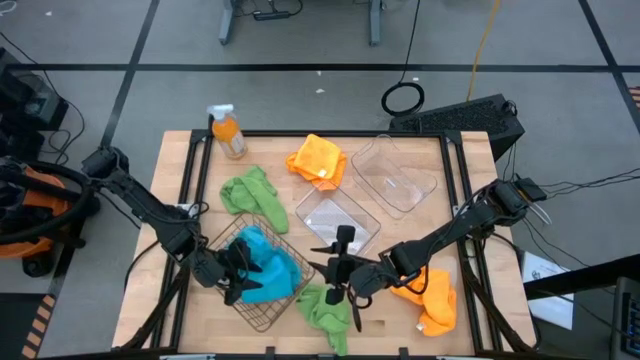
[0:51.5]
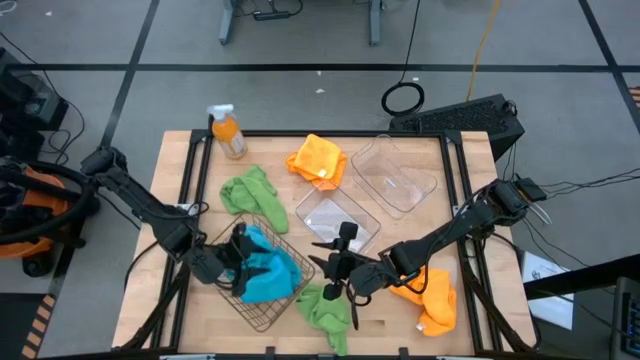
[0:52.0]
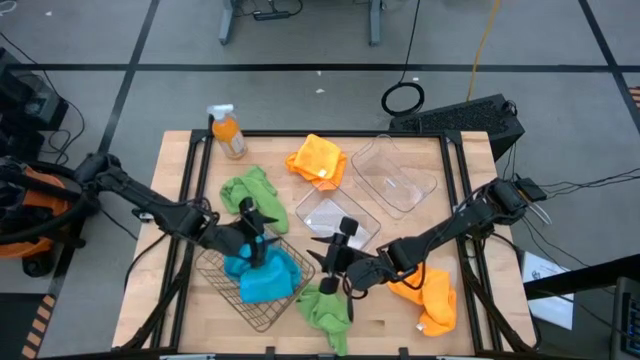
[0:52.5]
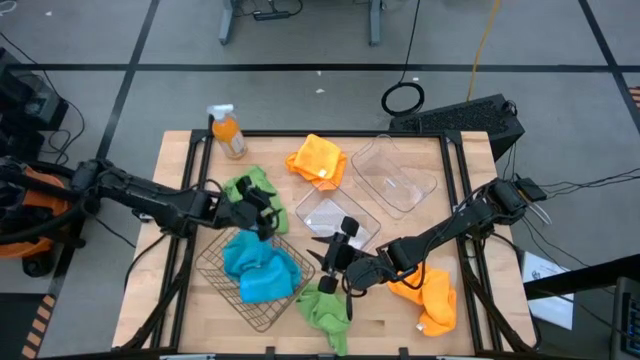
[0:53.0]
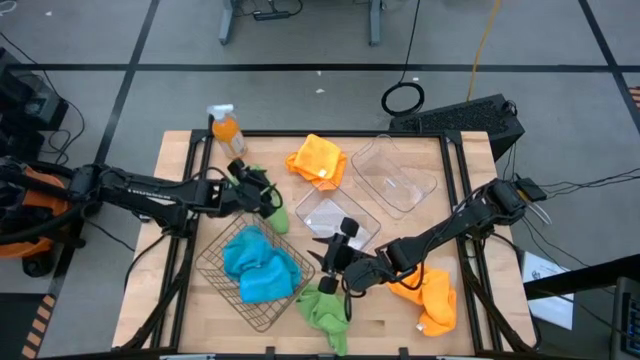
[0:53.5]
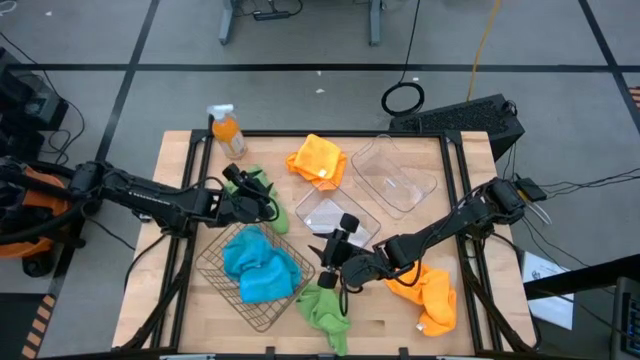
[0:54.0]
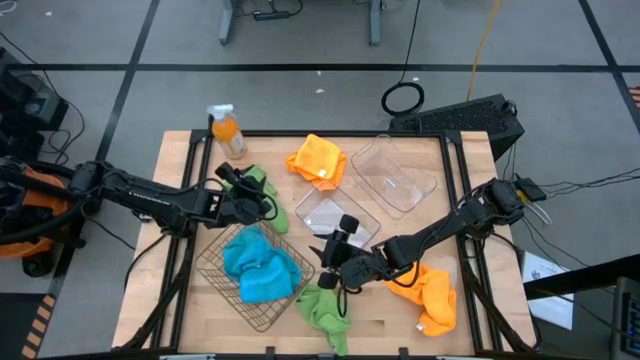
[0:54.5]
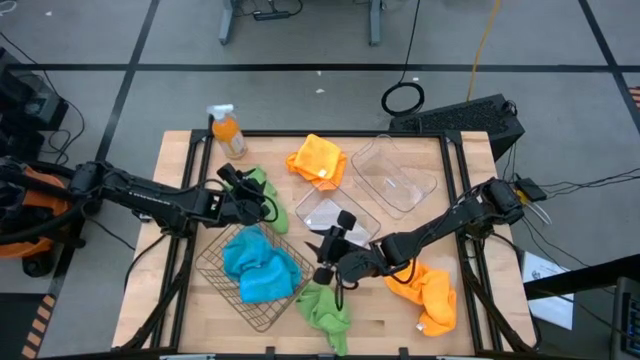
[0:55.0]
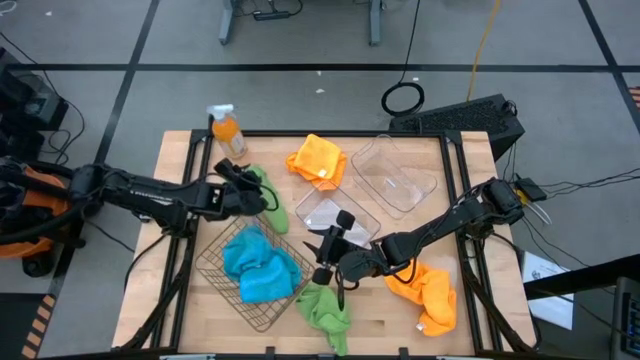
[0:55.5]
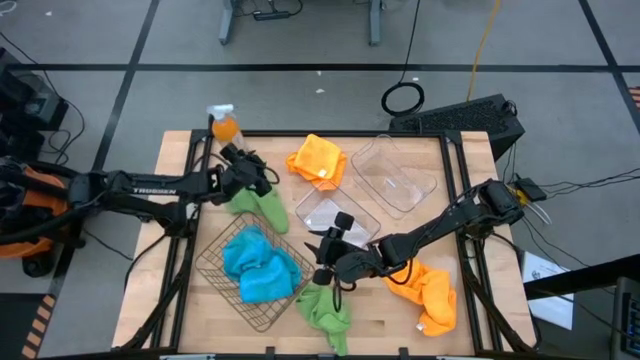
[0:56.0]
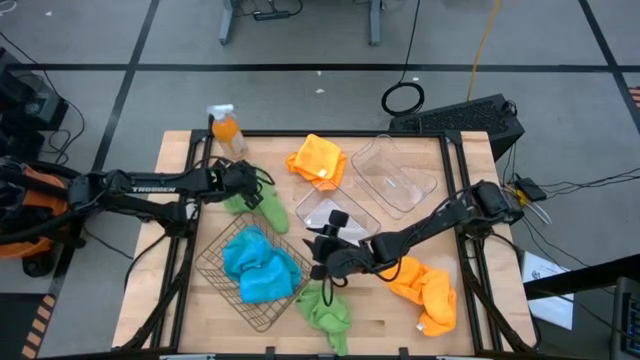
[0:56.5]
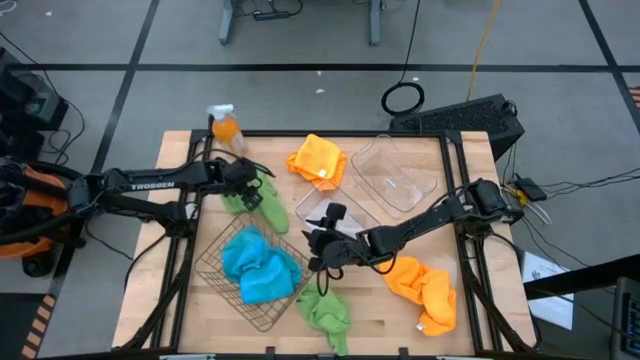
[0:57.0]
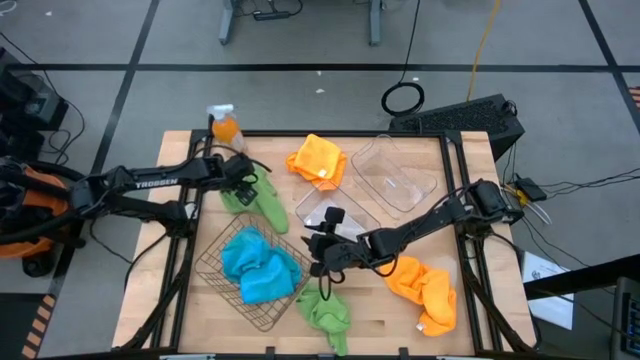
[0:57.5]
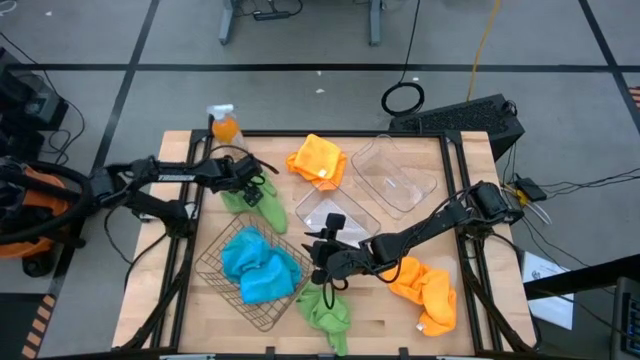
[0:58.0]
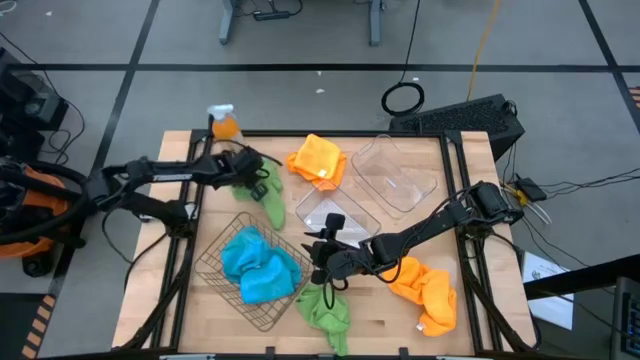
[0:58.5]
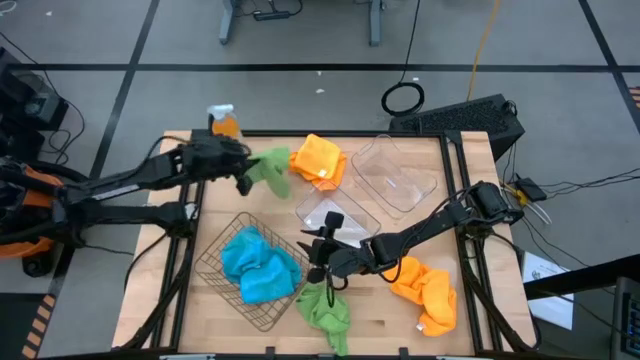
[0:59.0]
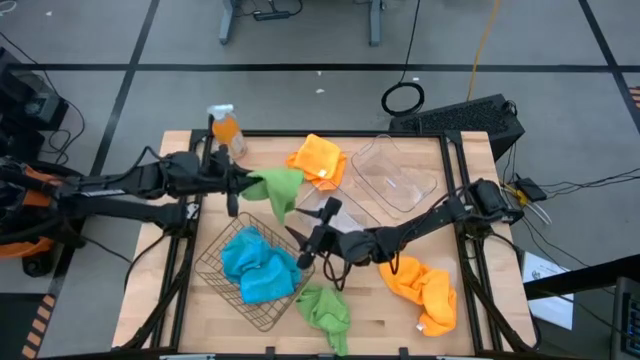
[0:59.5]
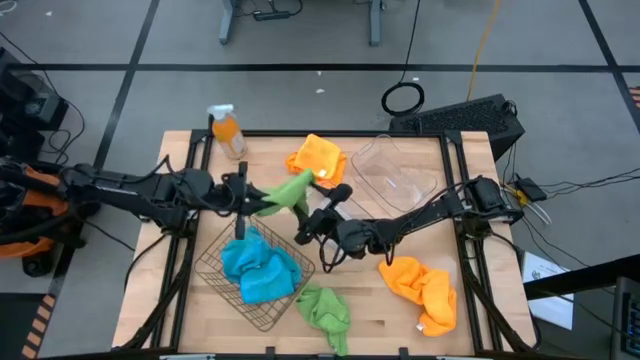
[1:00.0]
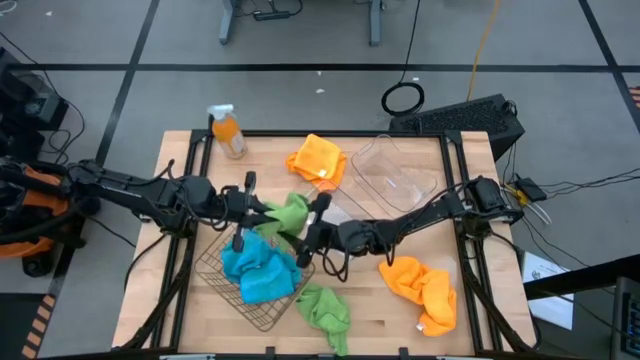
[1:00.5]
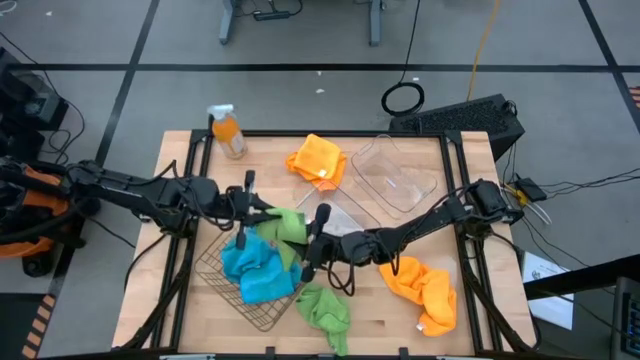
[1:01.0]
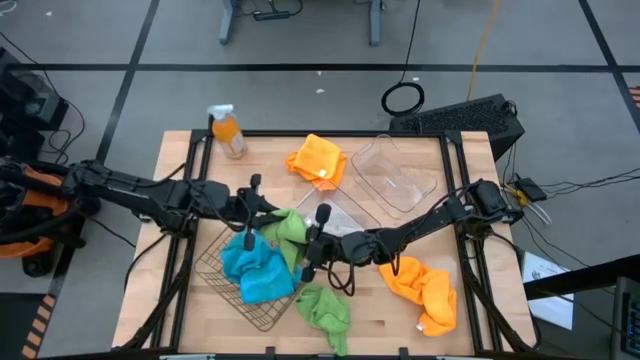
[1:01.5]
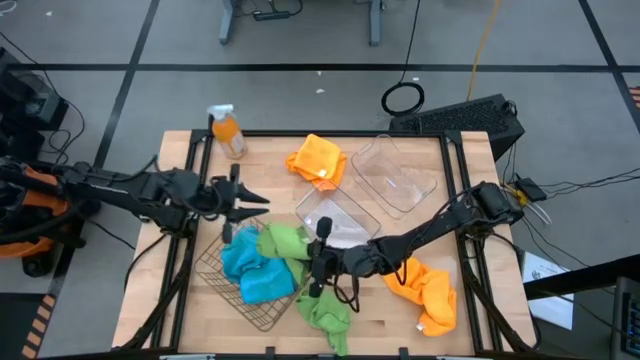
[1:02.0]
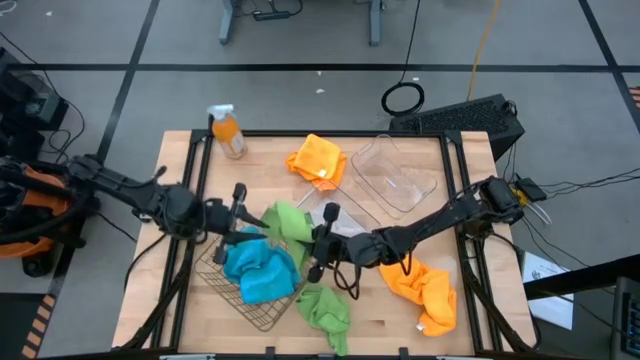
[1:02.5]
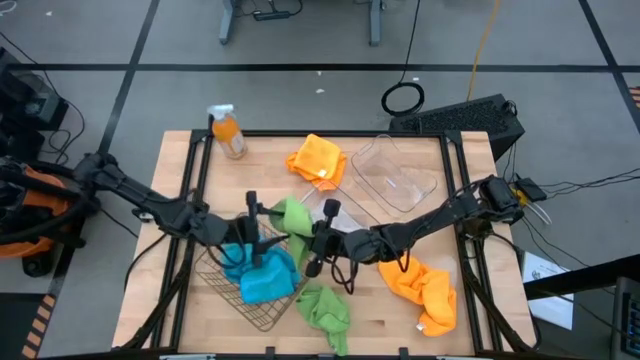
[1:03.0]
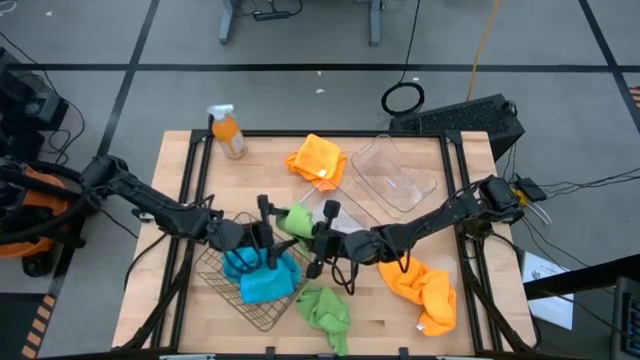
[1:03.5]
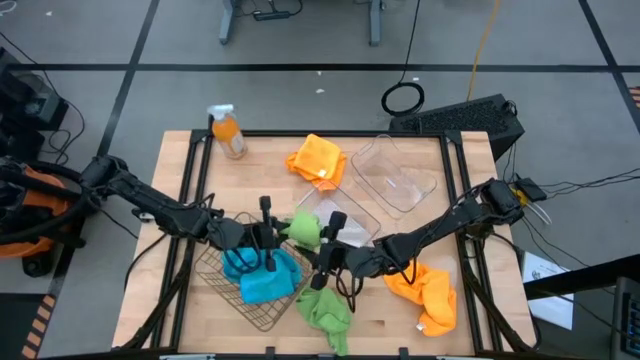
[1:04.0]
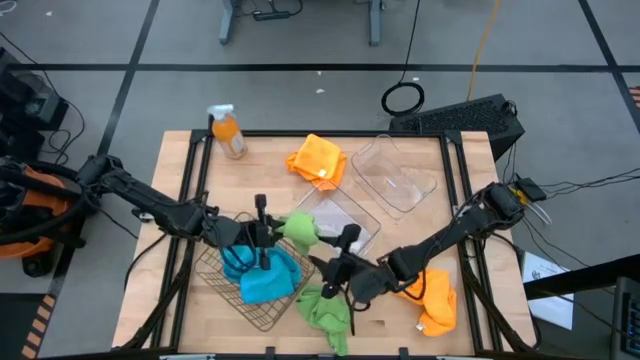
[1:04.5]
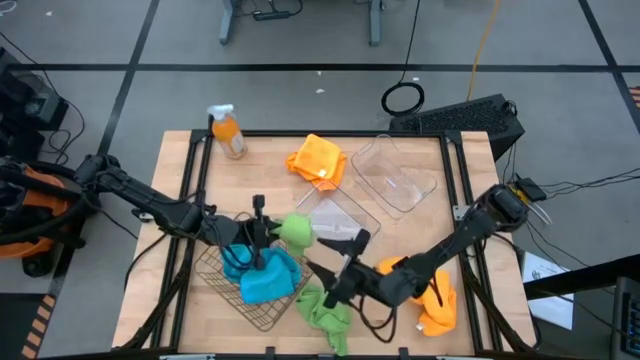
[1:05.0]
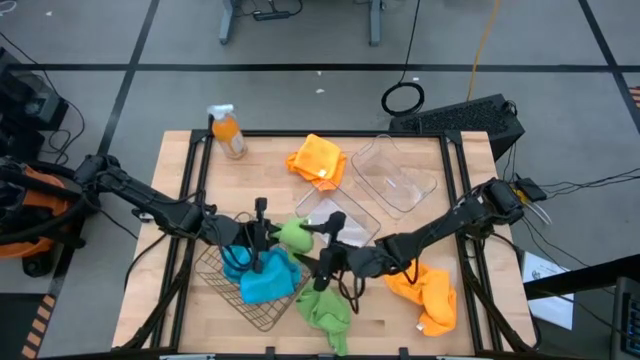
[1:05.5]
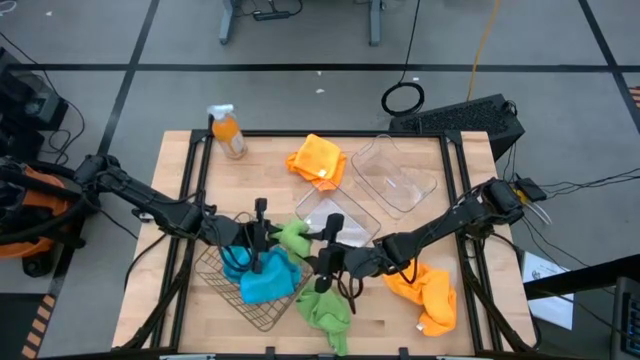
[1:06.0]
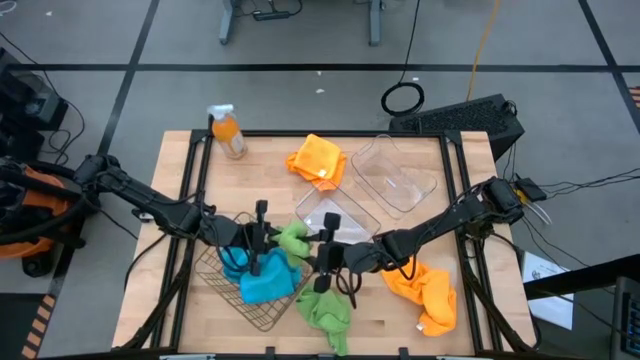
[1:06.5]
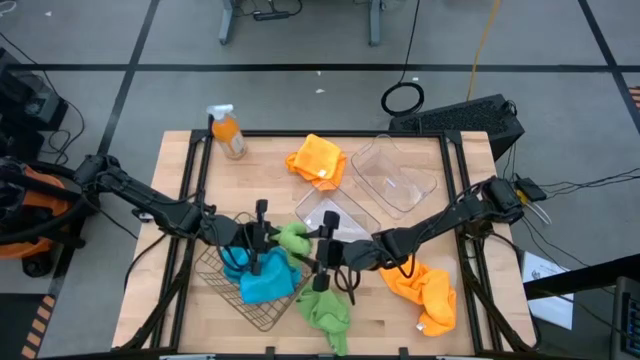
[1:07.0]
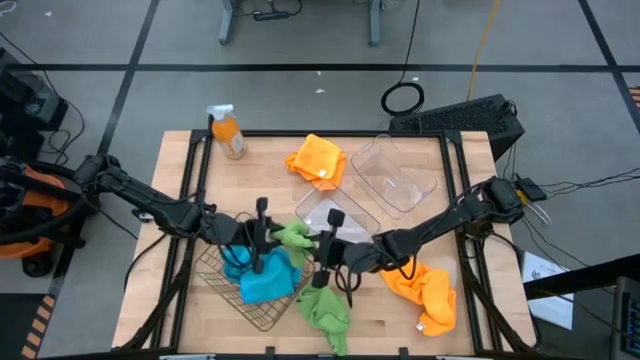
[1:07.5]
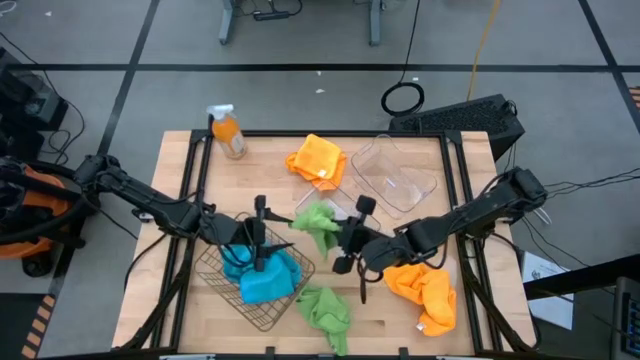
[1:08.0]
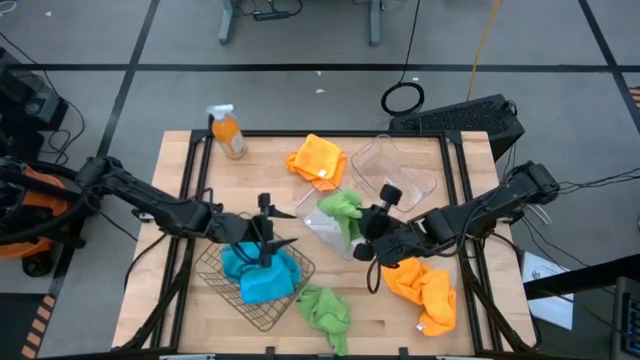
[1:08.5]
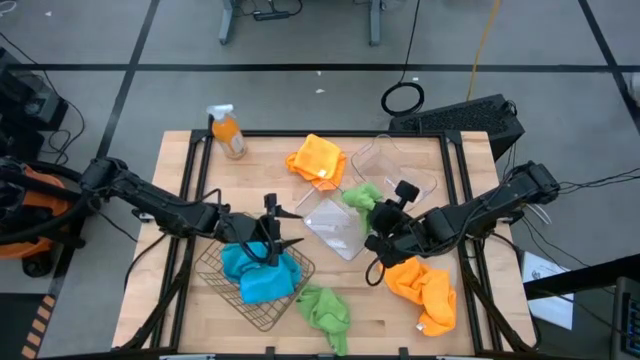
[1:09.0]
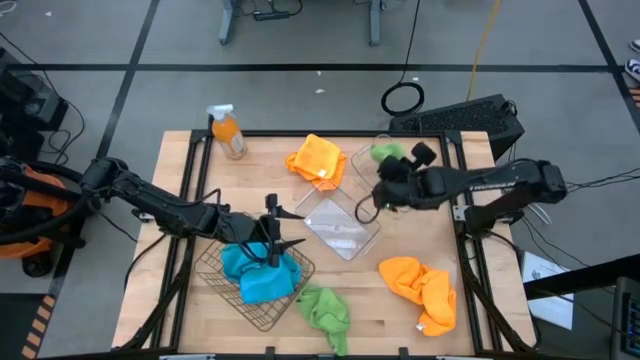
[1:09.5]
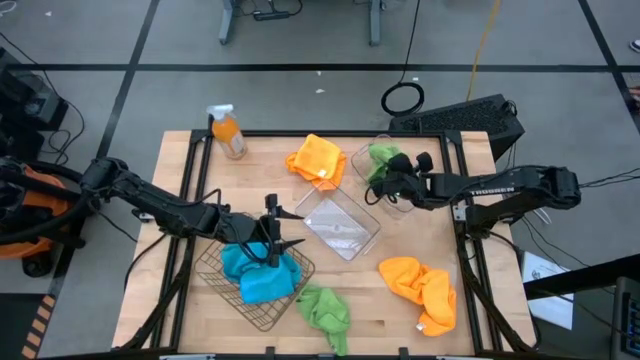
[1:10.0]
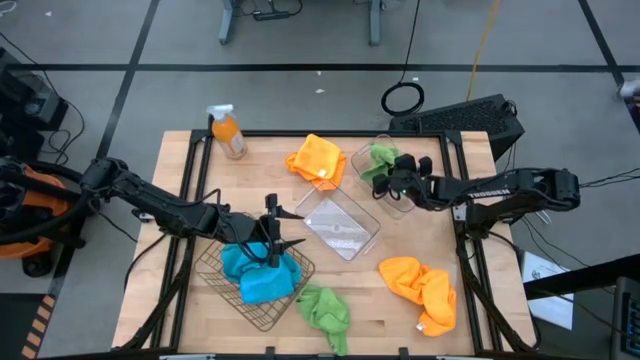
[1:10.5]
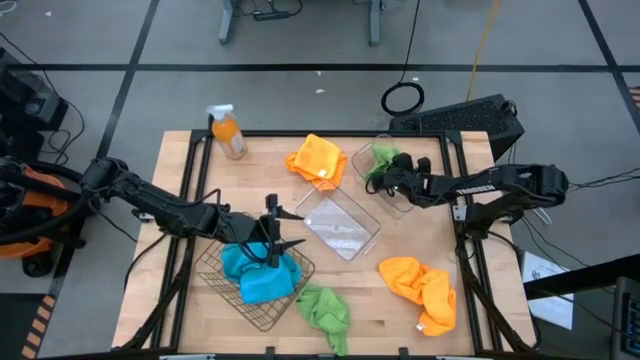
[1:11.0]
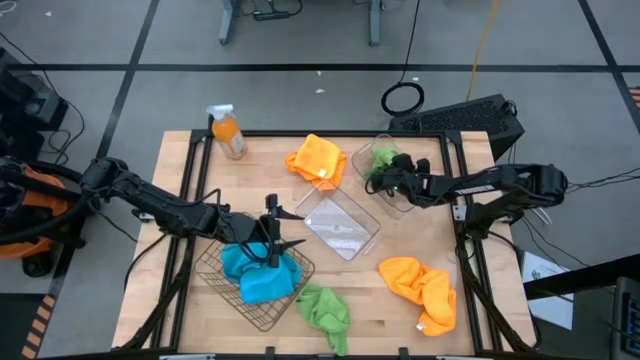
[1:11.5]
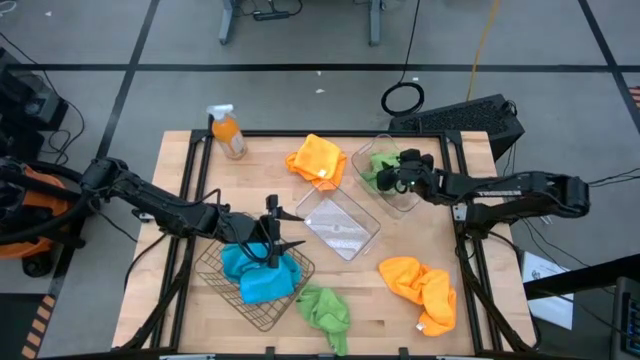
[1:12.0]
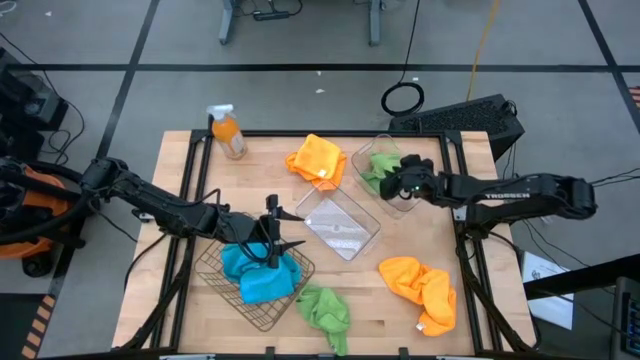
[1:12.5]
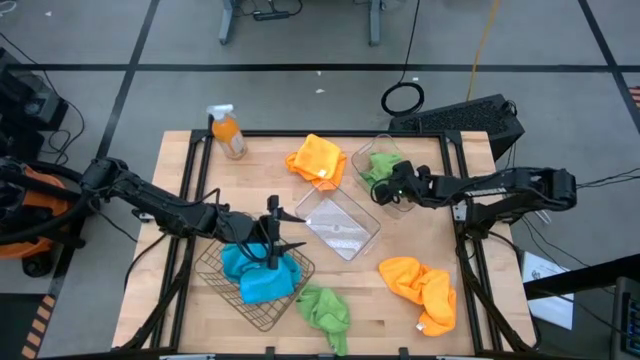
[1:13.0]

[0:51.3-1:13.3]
Task: Sort microfiber towel by color & place in baskets
Put the top green microfiber towel into the top transparent bin
